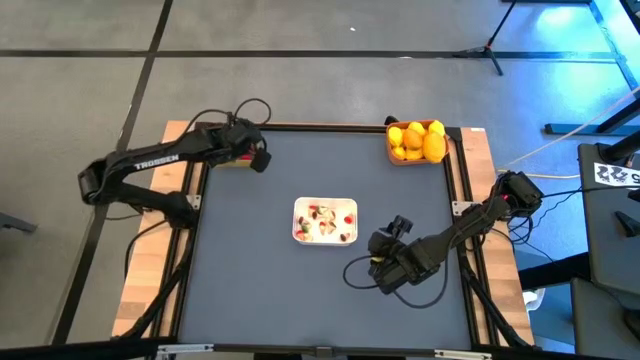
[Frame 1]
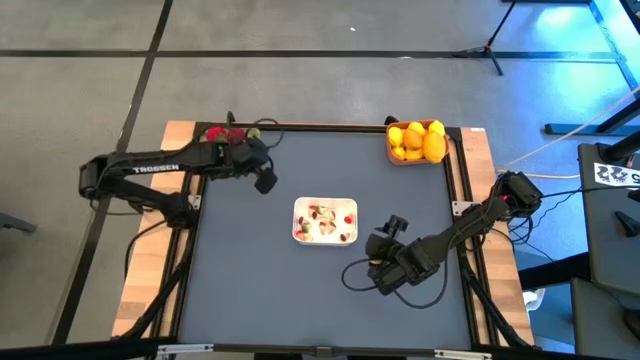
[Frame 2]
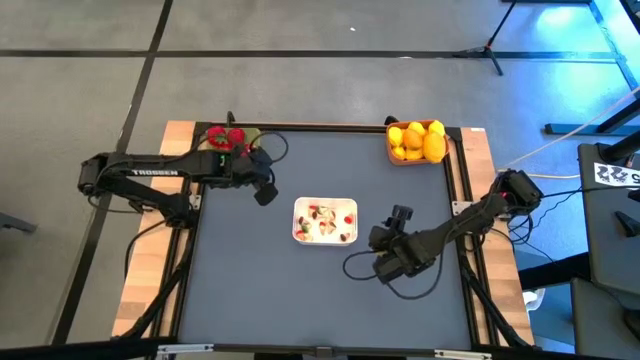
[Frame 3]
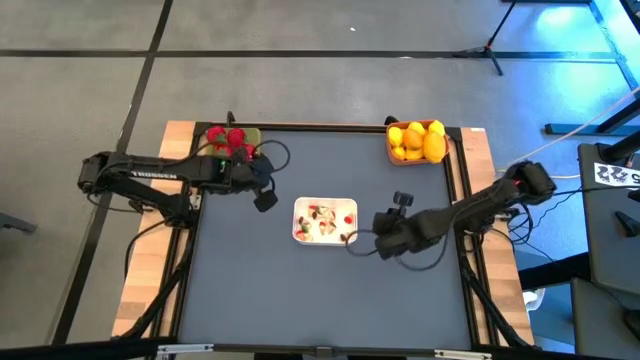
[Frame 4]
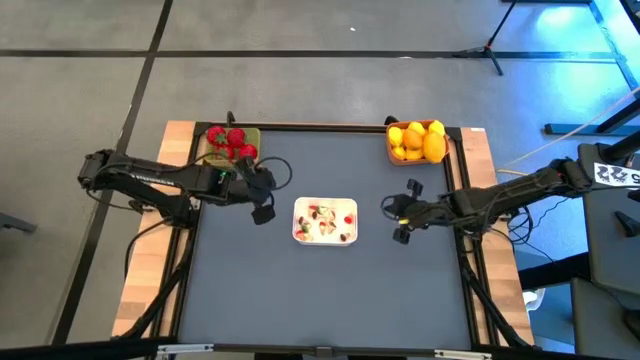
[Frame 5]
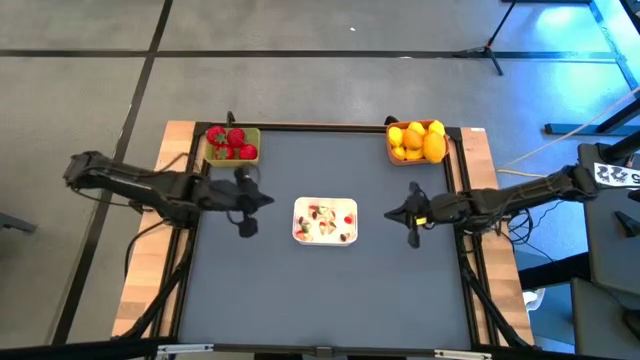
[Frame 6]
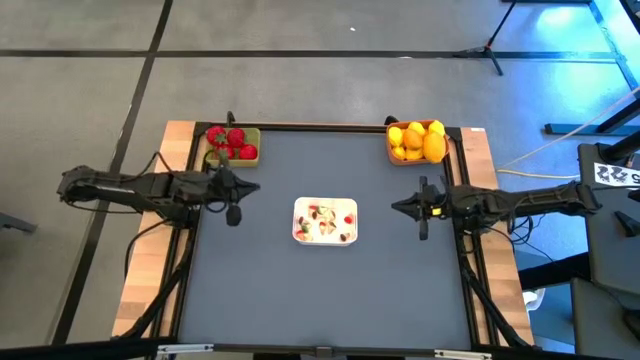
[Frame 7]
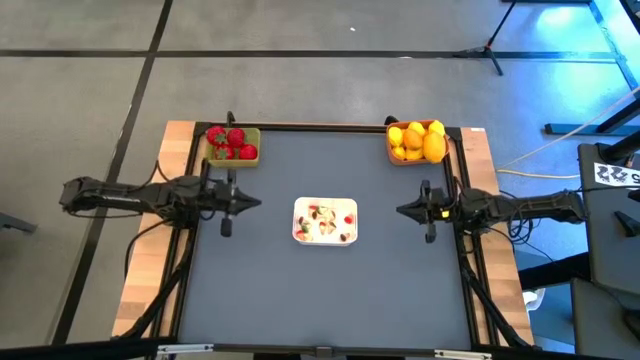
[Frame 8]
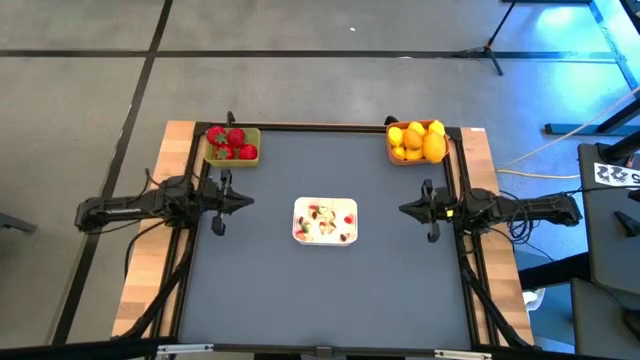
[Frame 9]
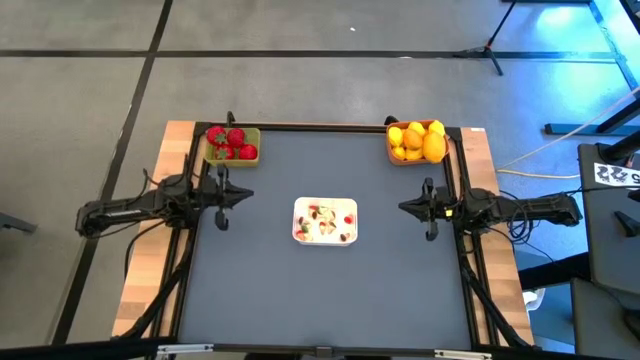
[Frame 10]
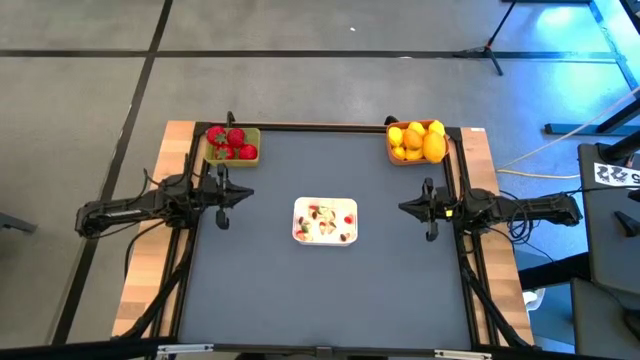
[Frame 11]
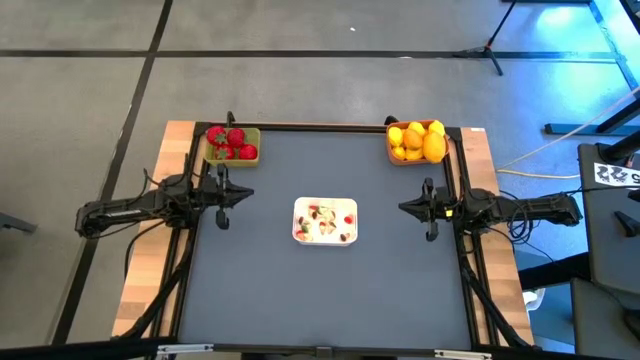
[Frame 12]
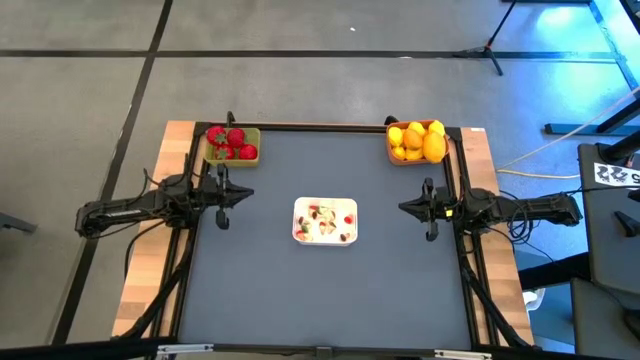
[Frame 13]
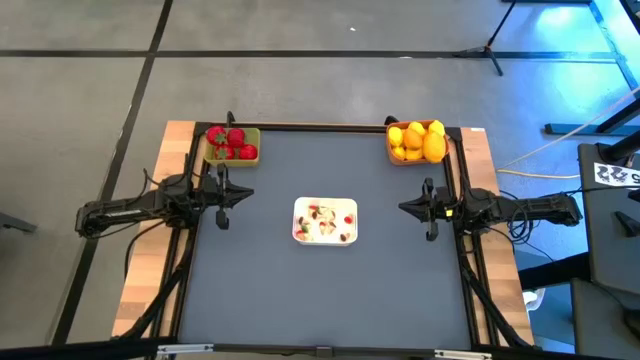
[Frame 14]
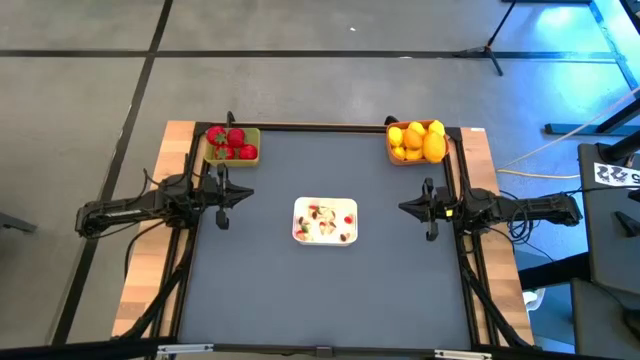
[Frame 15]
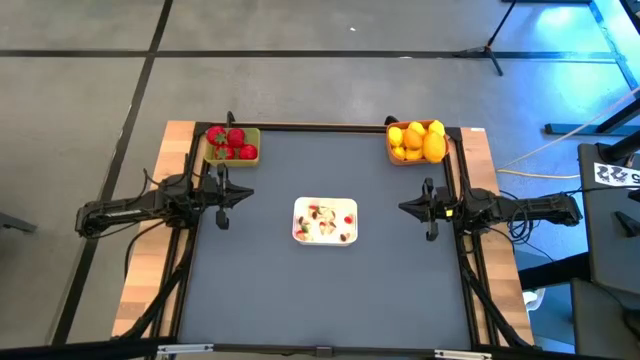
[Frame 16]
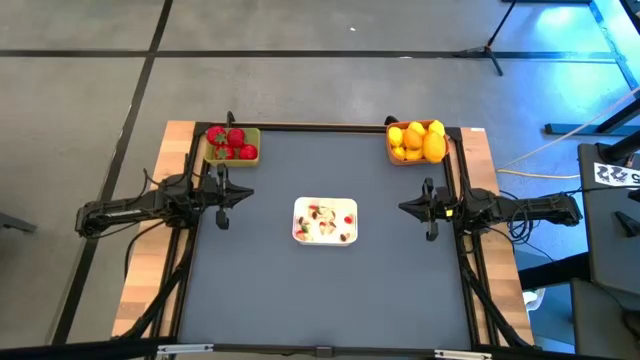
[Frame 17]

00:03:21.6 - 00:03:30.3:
Task: Sort produce into baskets
Return to Home Position

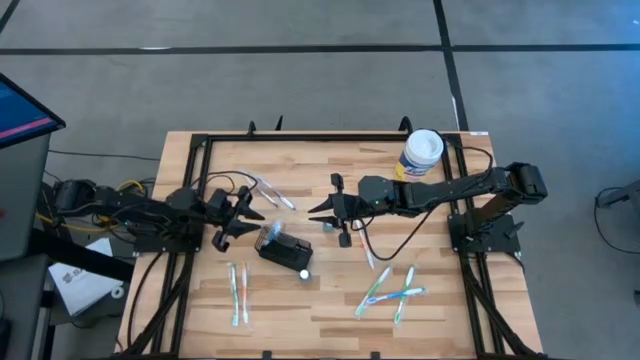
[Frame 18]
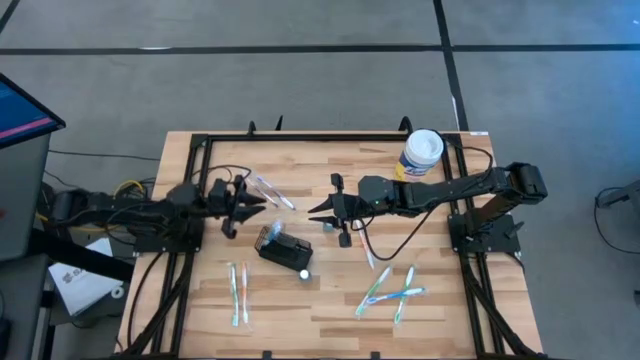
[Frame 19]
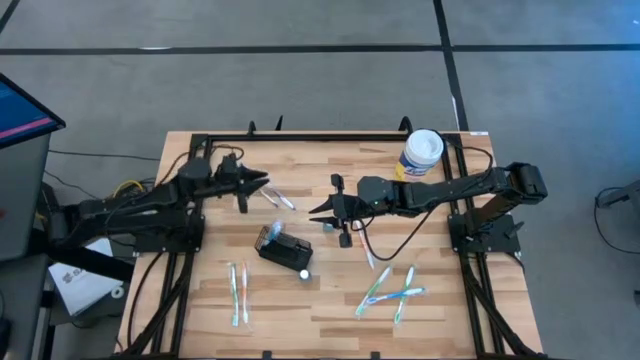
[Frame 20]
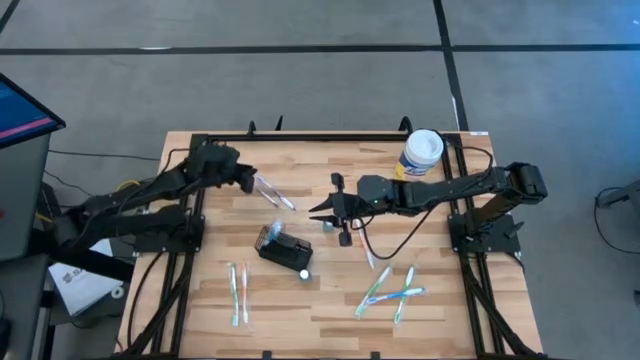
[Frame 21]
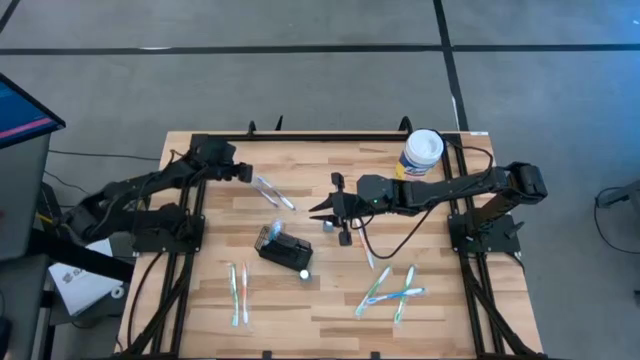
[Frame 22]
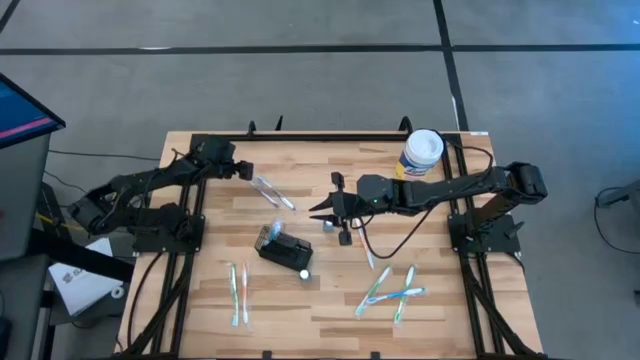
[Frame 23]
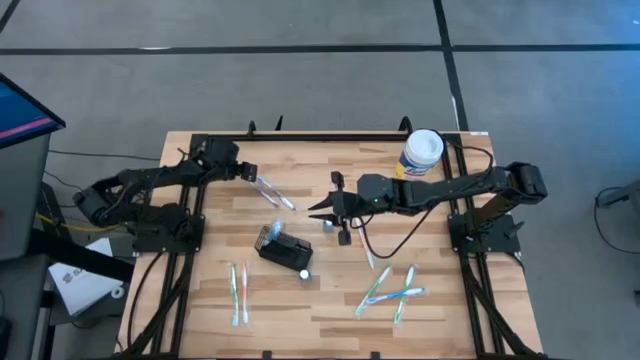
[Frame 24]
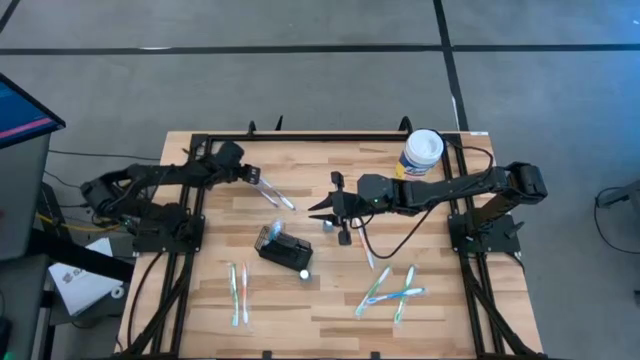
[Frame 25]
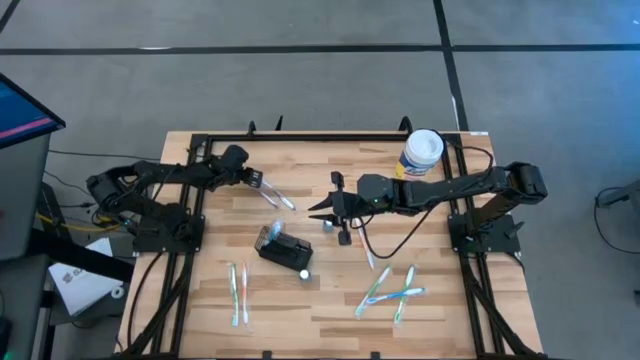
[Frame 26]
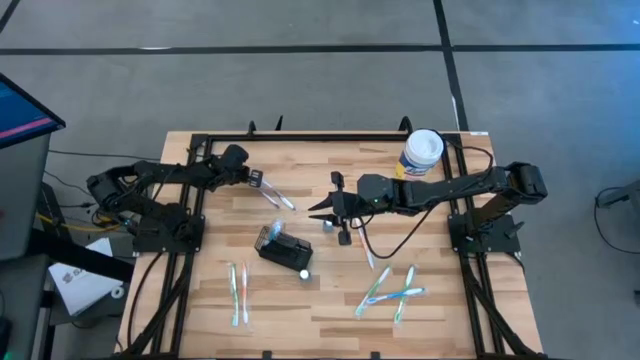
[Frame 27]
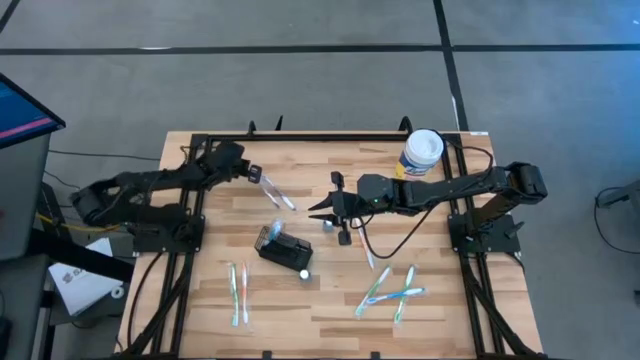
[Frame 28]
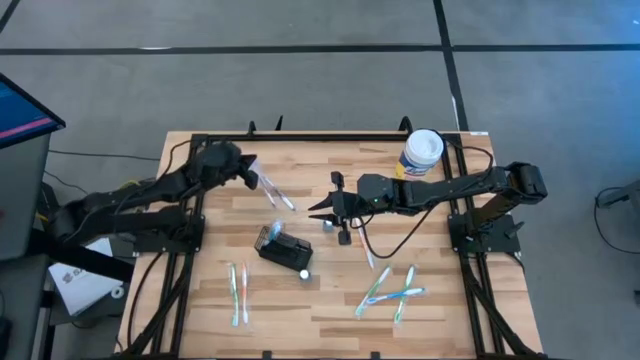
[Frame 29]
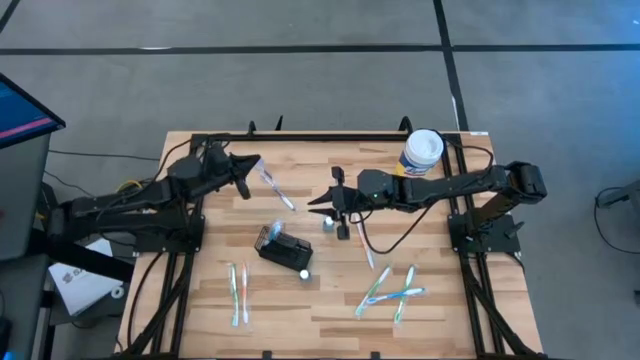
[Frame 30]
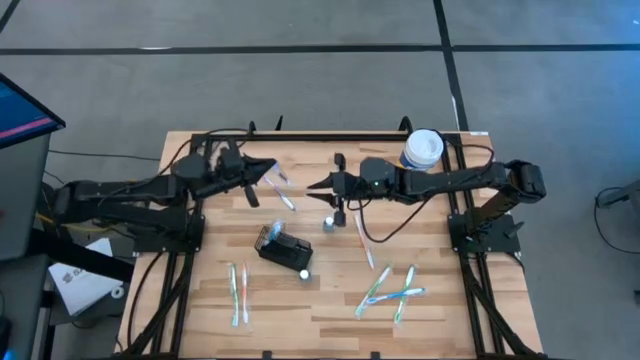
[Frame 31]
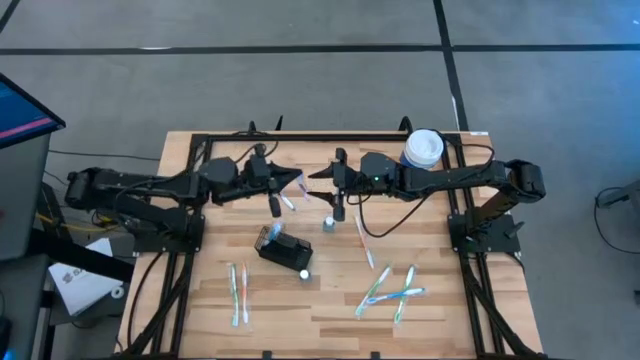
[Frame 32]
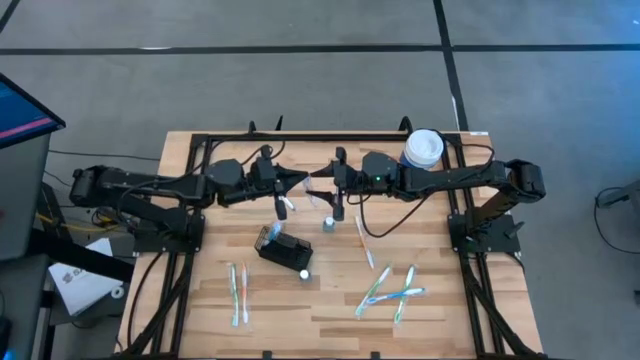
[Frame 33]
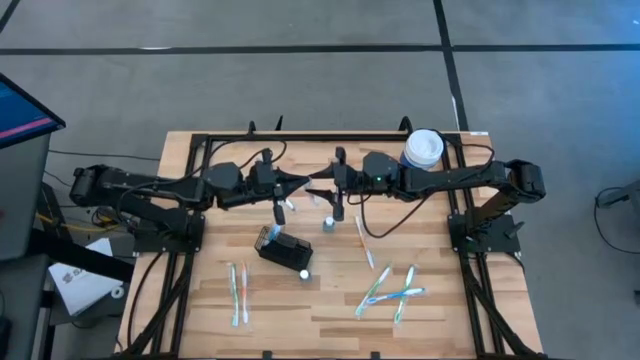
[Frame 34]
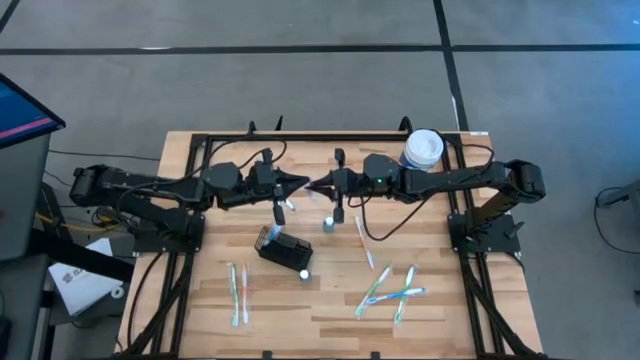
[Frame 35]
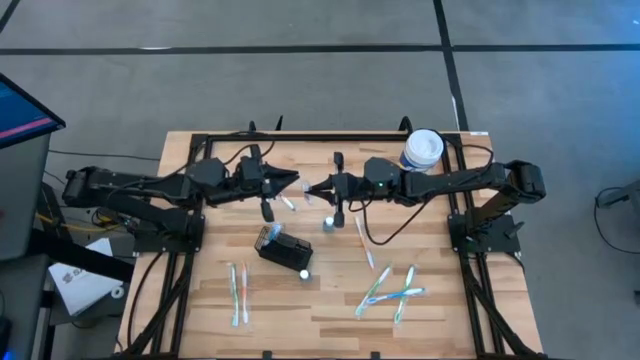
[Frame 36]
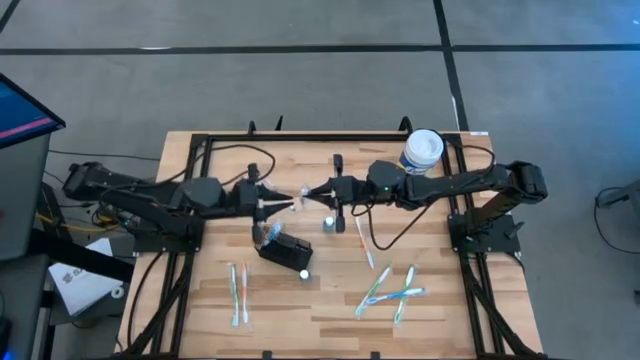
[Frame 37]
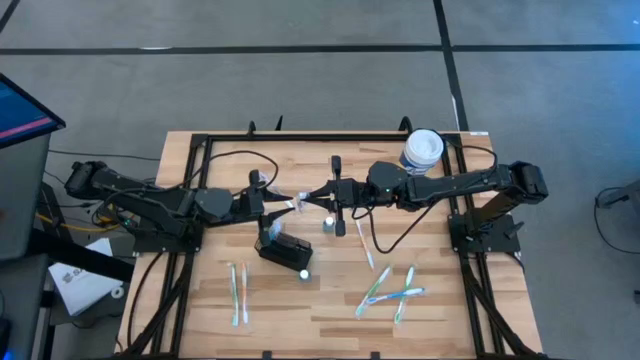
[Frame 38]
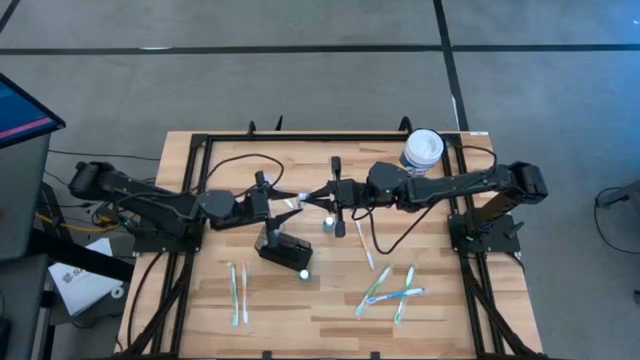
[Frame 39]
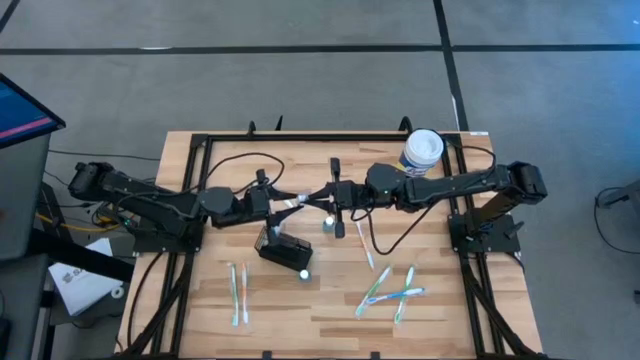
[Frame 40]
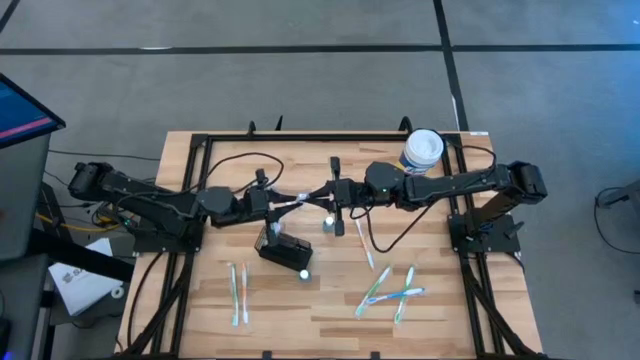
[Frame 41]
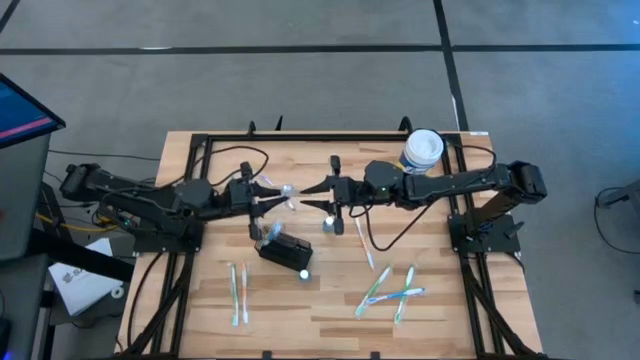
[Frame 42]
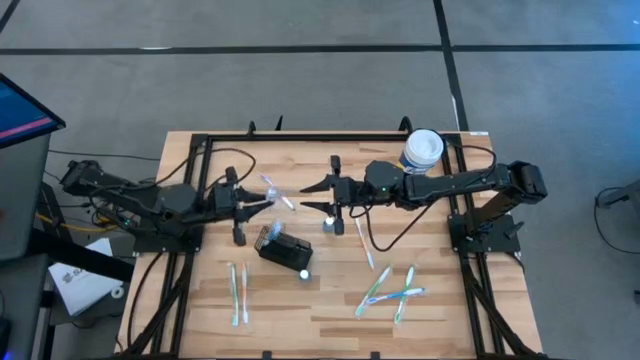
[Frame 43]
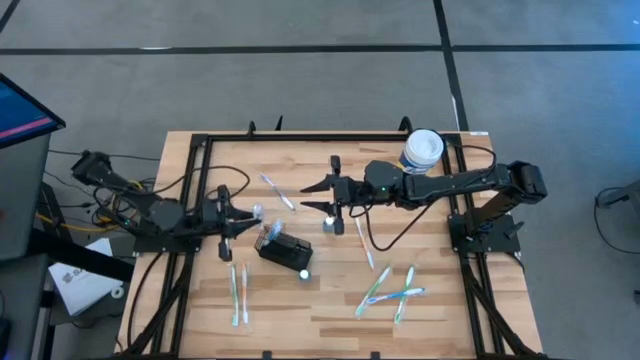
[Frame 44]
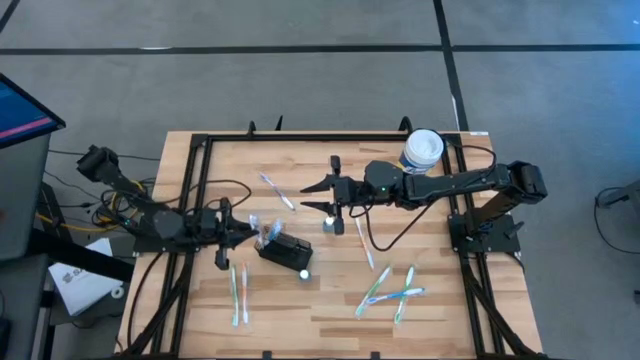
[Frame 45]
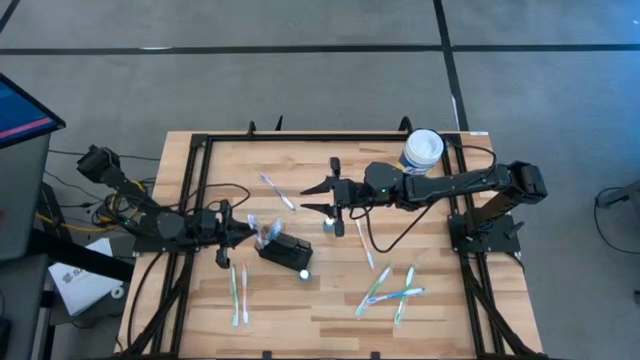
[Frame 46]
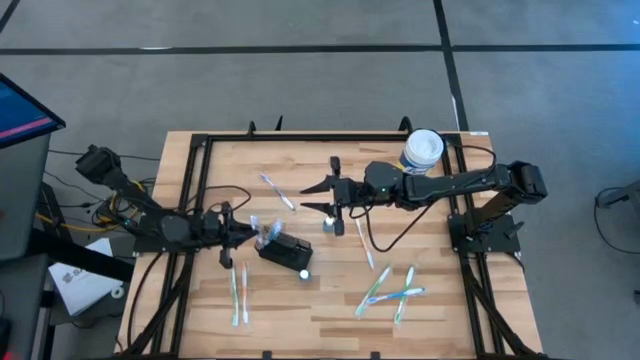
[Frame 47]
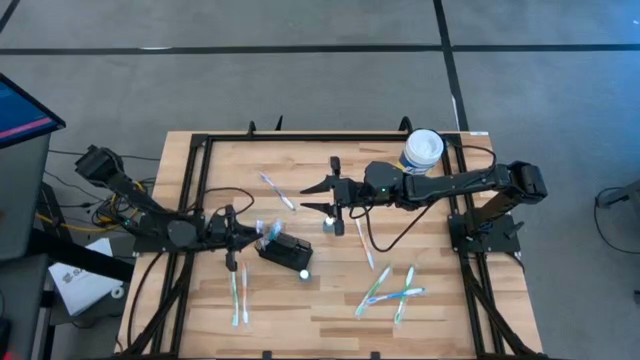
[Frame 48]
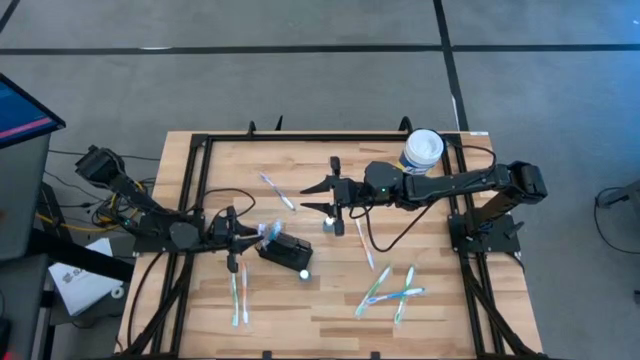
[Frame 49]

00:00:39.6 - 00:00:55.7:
Task: Pick & Place toothbrushing station
Put the left purple toothbrush into the right compartment of the wire organizer
